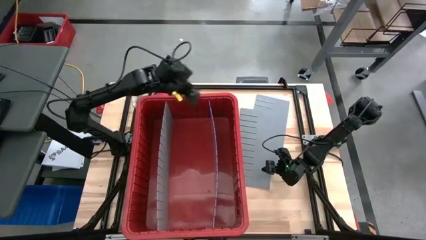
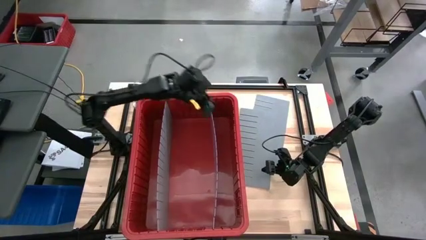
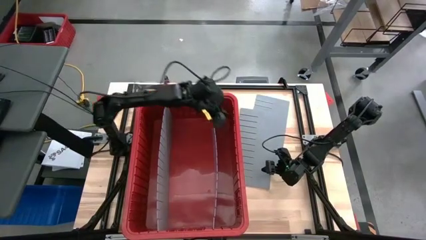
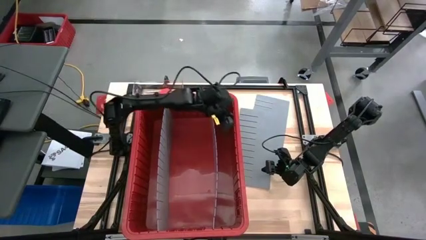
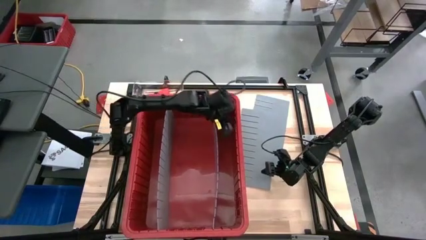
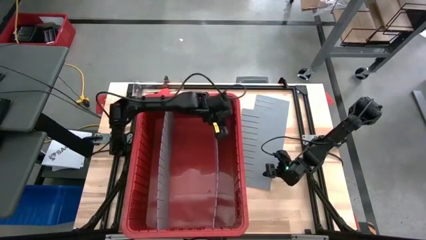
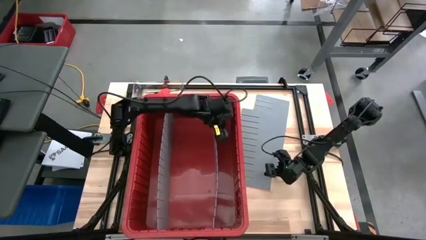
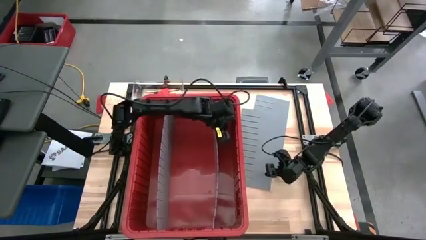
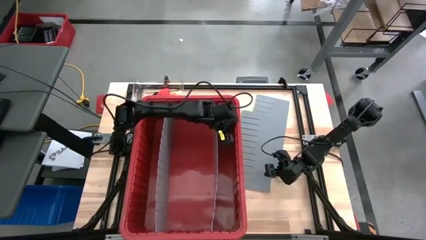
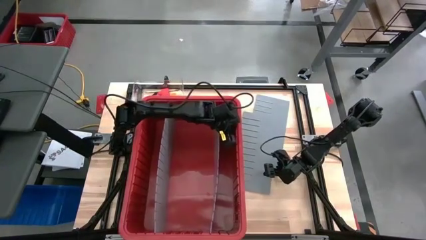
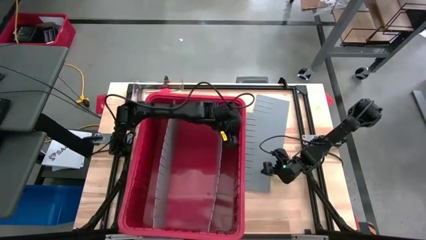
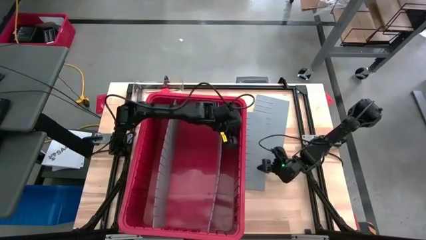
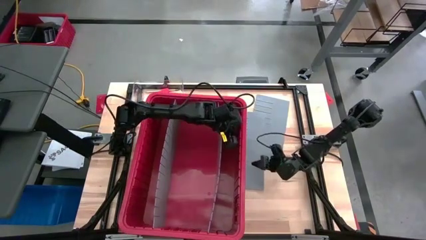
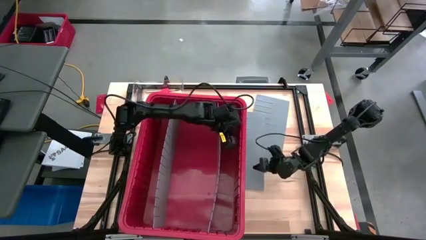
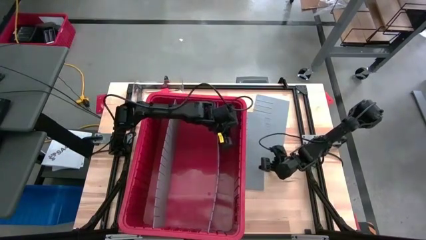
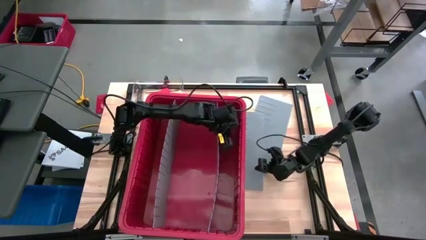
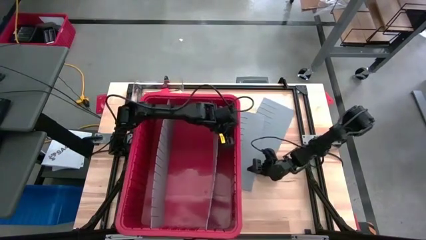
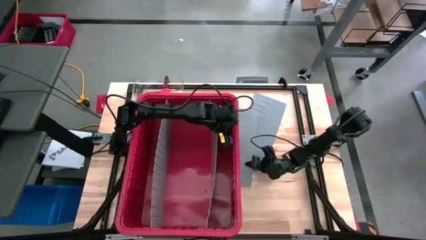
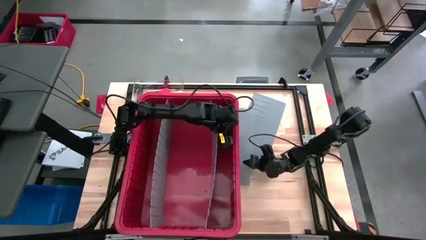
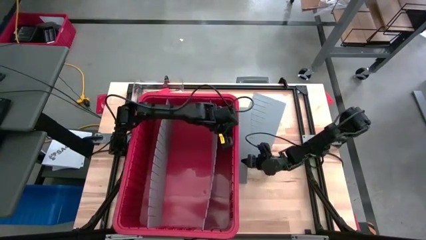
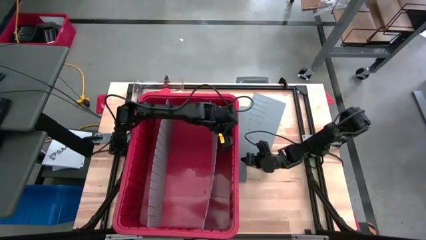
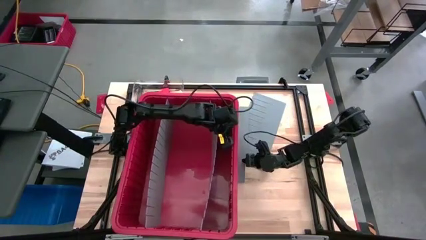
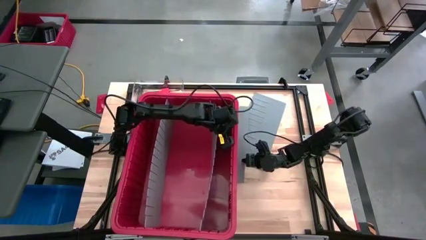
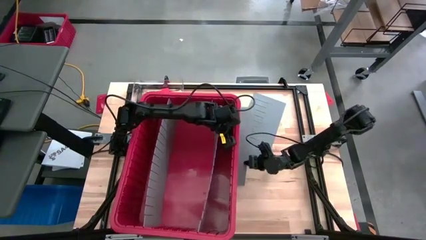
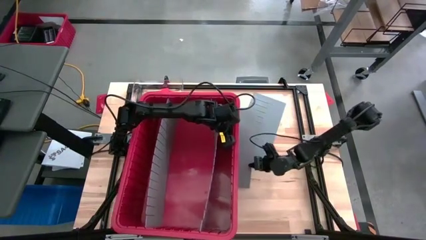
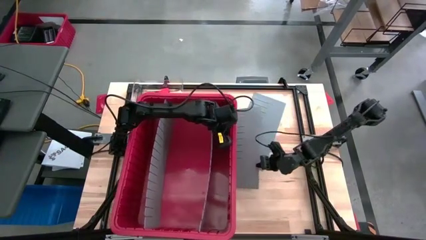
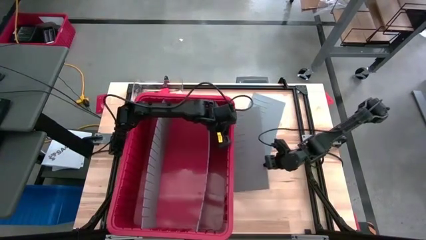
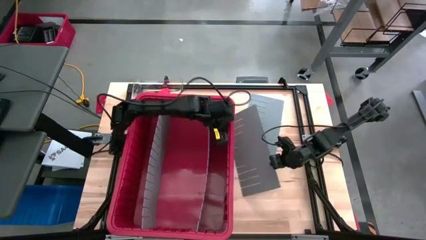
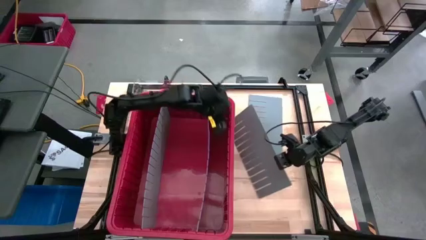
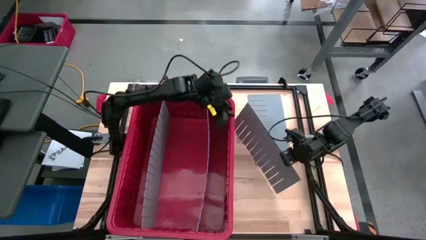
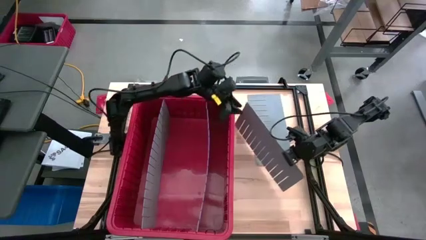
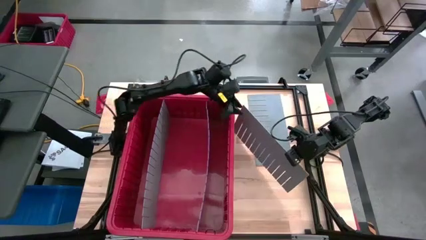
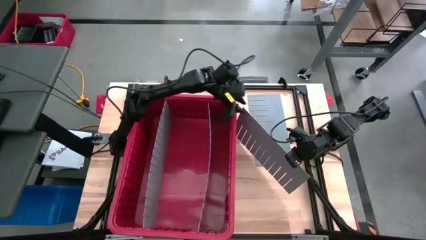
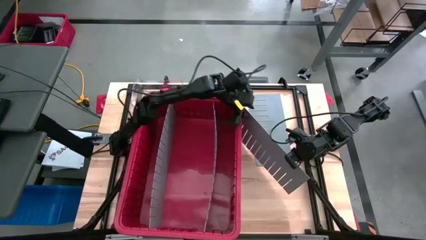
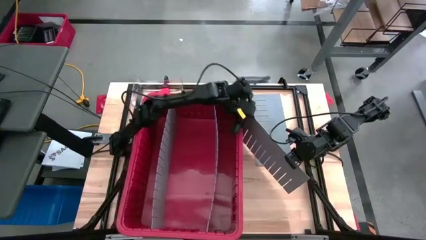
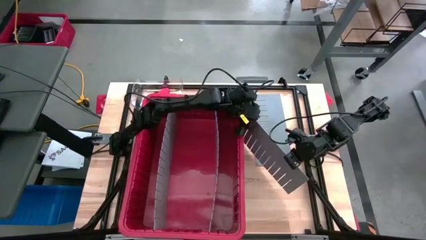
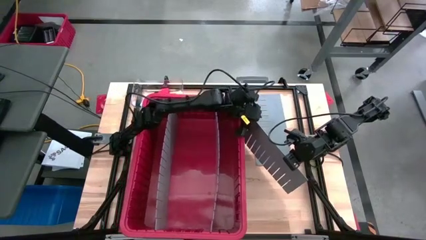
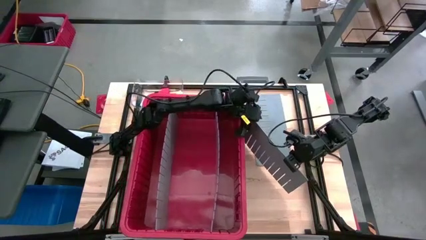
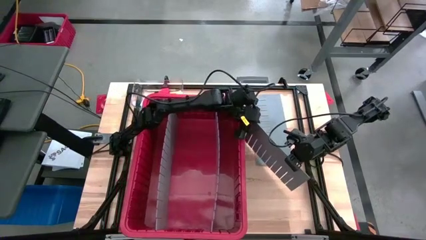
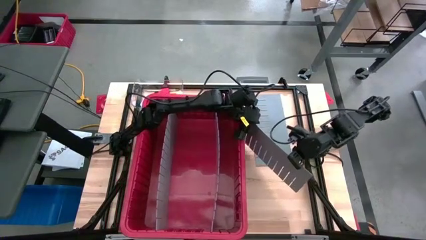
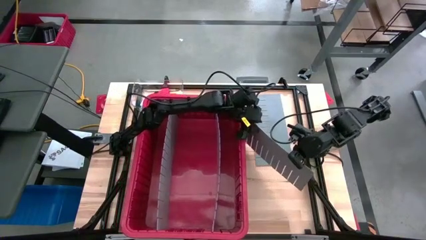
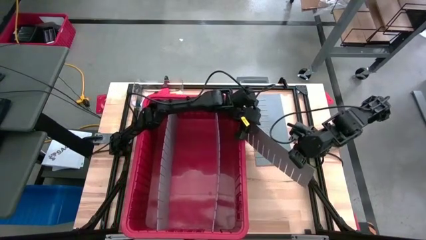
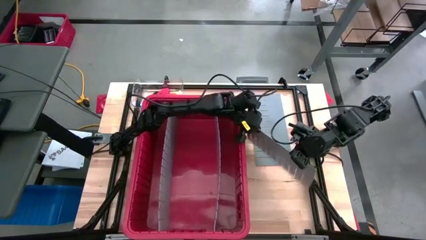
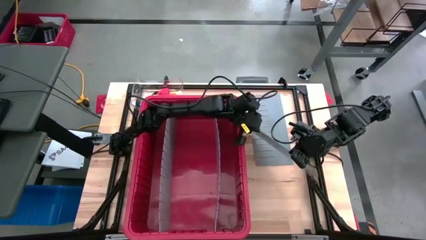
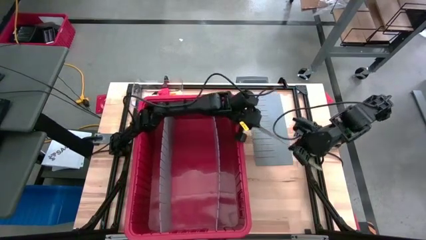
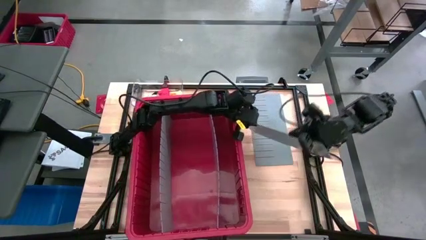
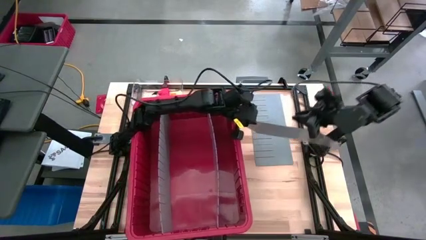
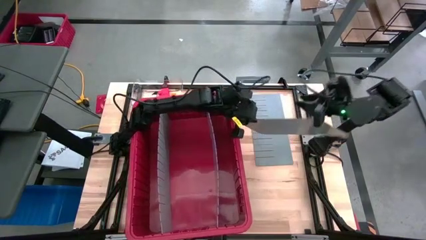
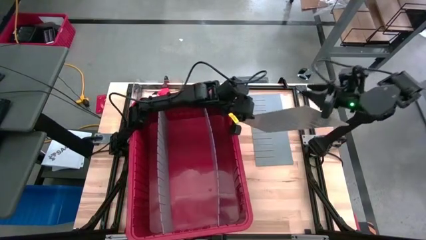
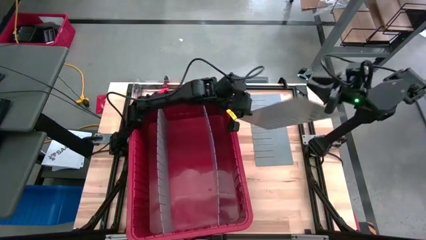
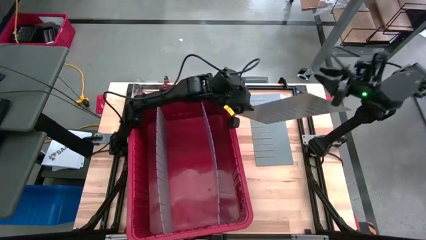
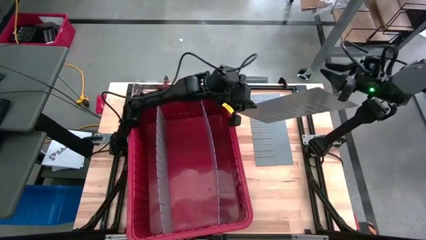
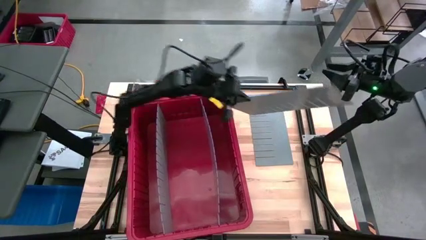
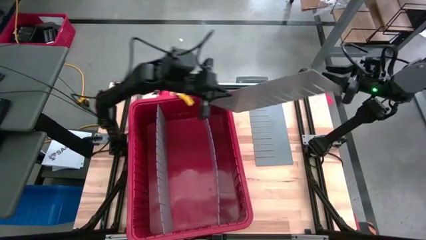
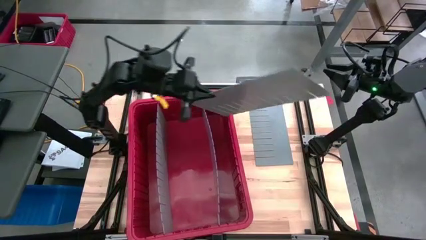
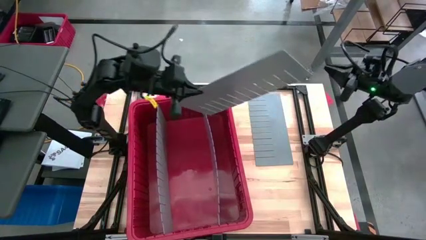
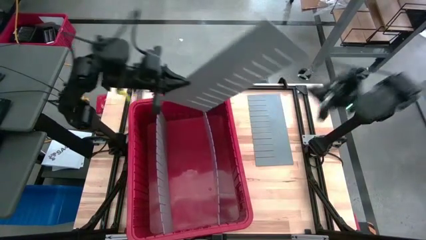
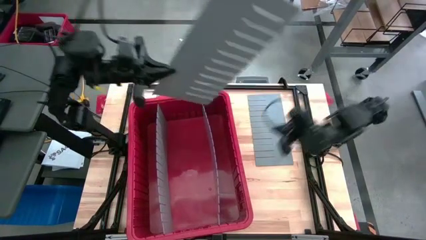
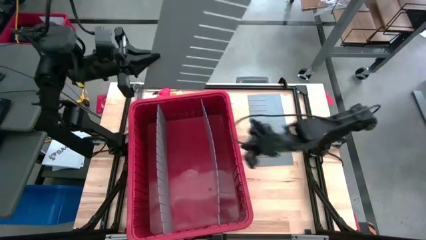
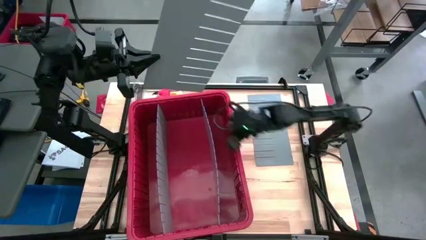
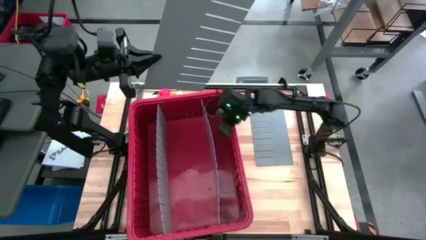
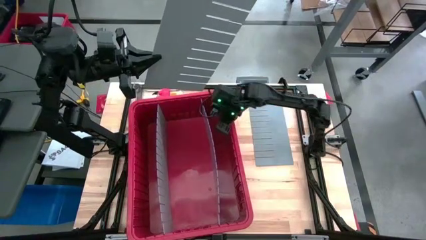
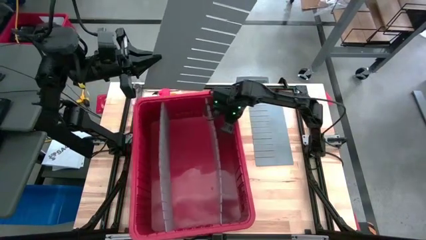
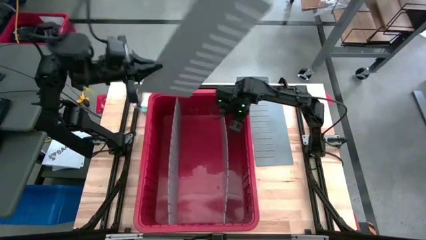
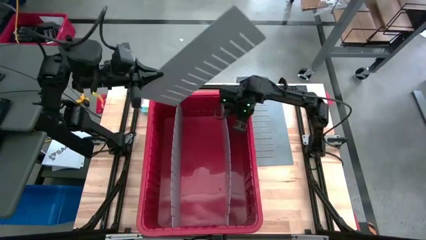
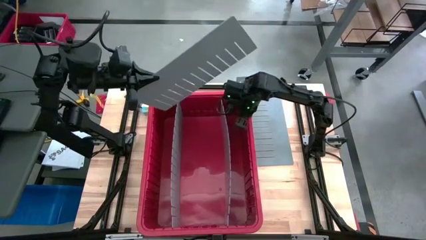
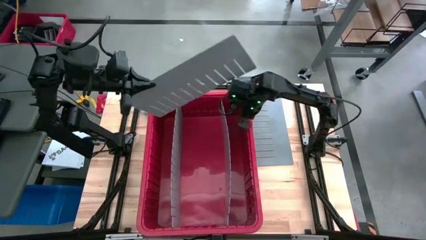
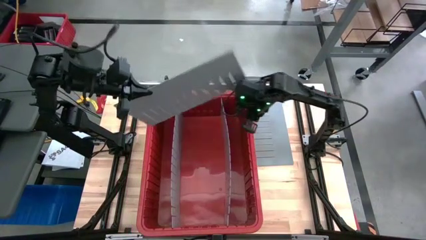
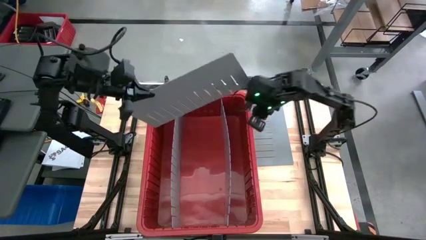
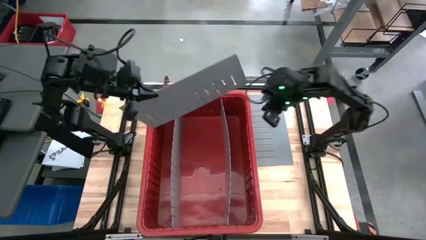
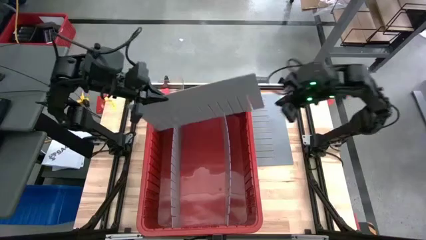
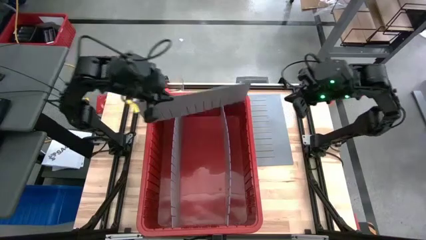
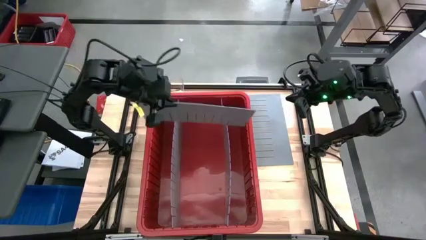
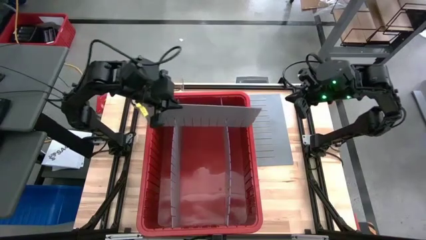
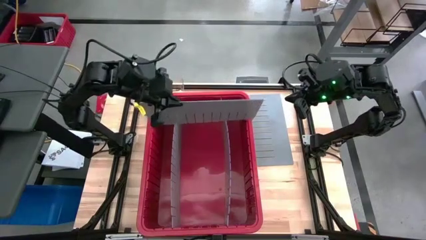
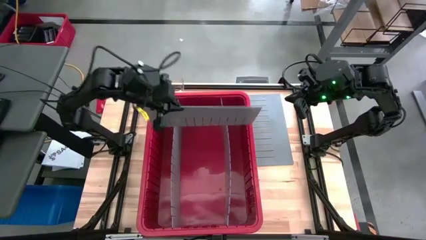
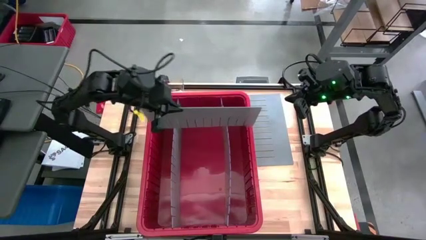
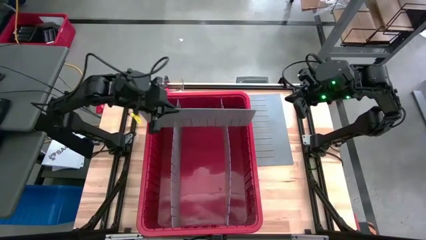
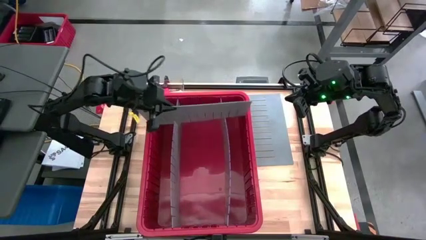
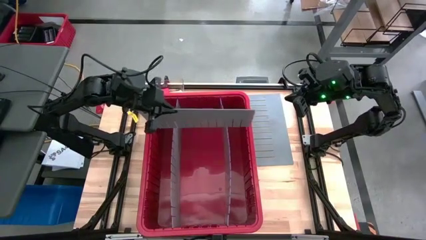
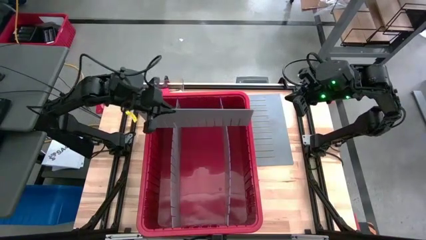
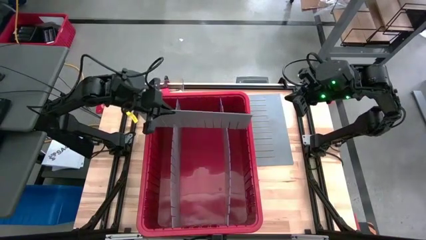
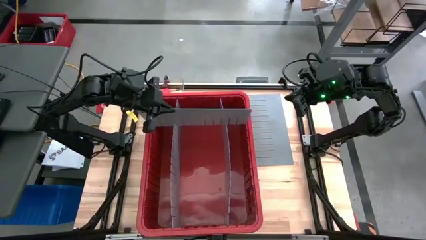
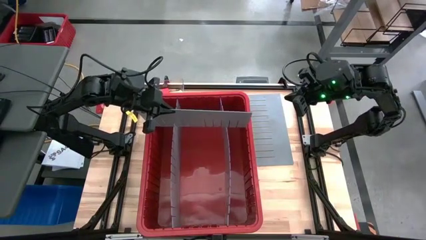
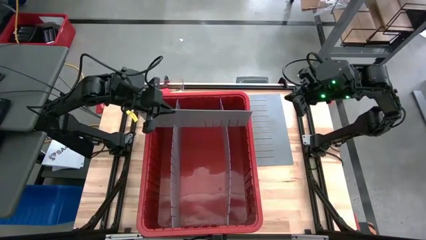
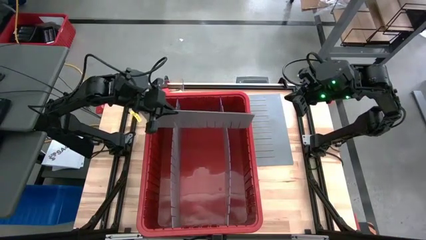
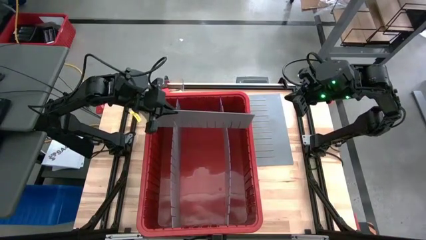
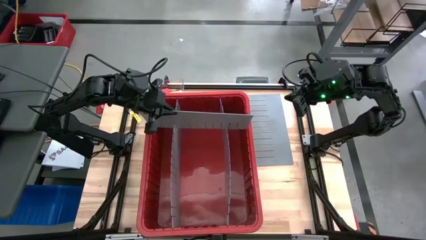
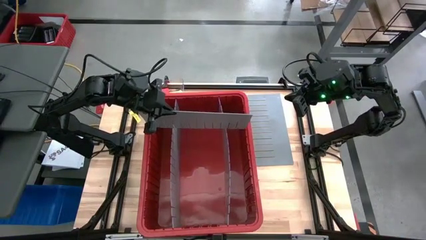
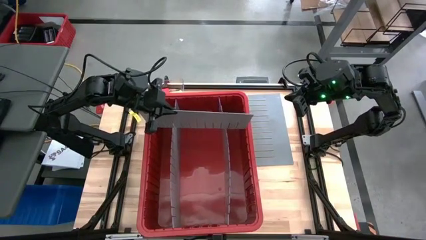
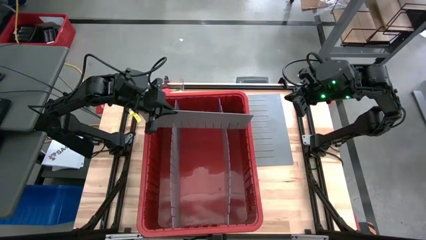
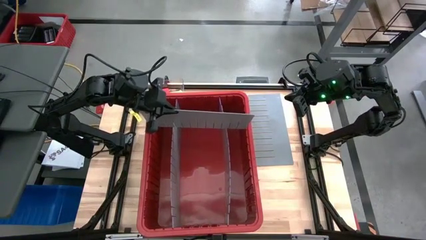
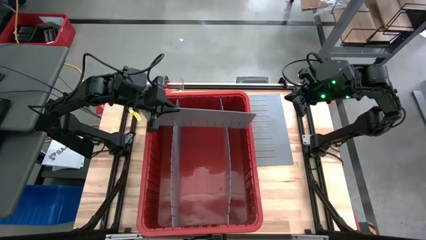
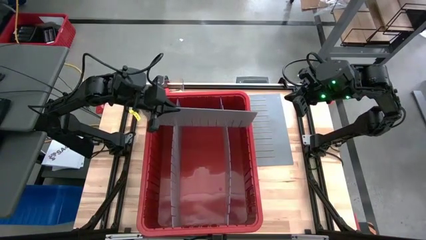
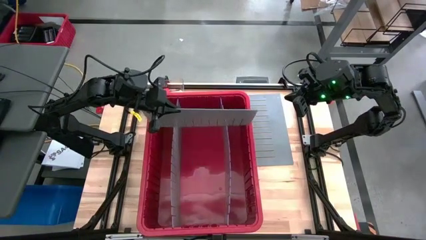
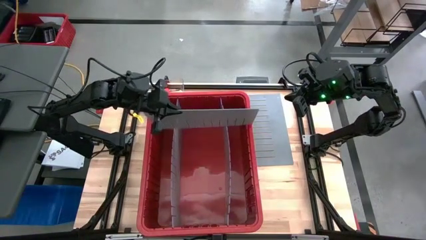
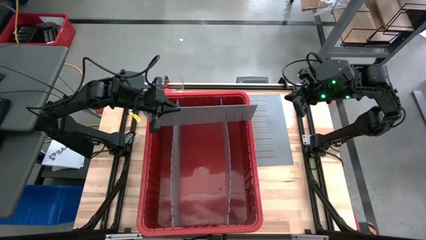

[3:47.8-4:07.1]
Task: Sort blocks
Assemble the bin divider into the red bin
